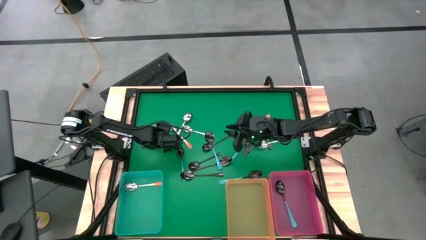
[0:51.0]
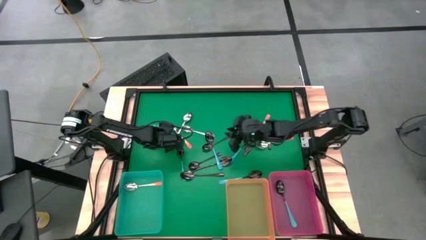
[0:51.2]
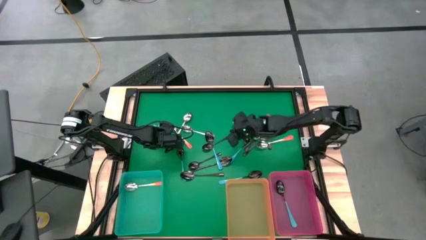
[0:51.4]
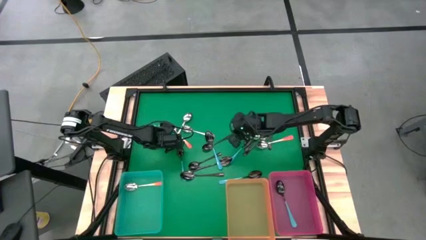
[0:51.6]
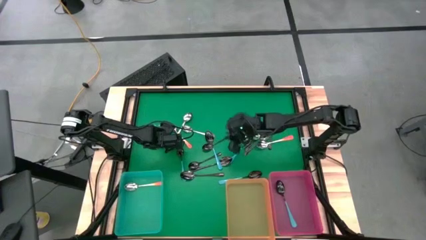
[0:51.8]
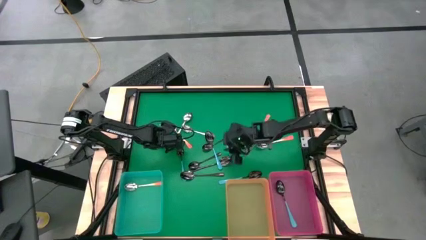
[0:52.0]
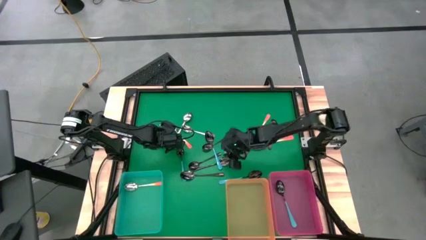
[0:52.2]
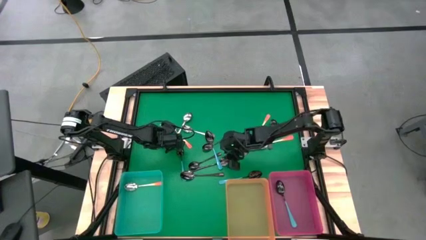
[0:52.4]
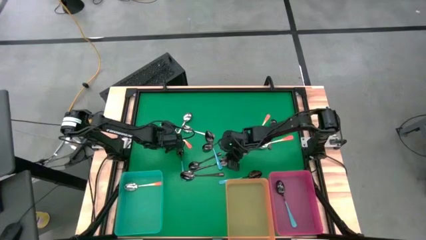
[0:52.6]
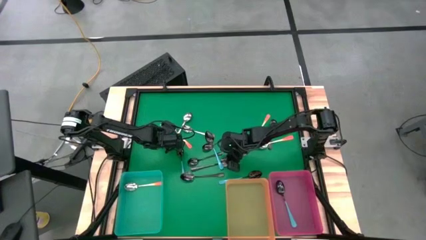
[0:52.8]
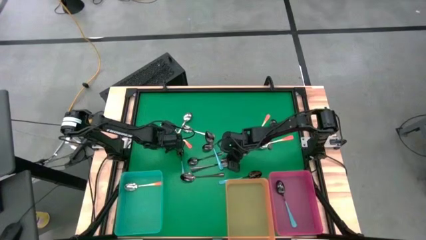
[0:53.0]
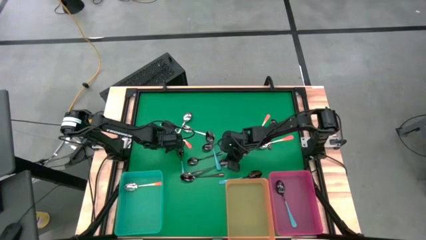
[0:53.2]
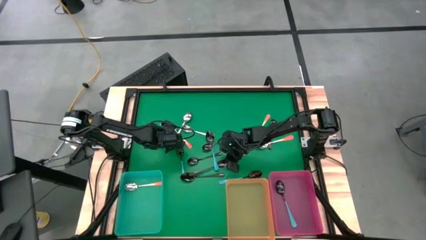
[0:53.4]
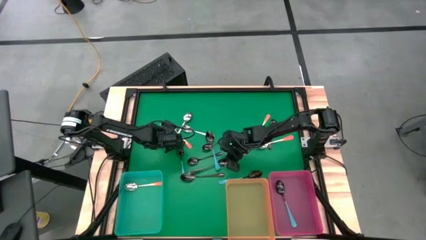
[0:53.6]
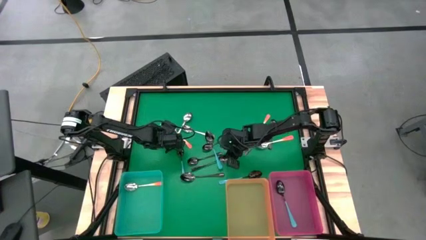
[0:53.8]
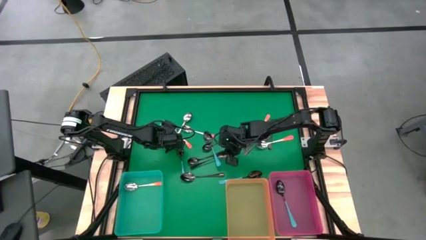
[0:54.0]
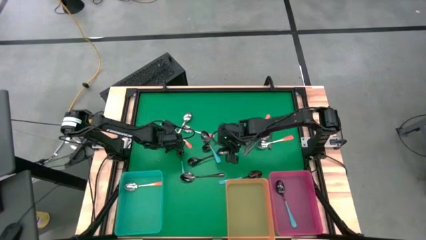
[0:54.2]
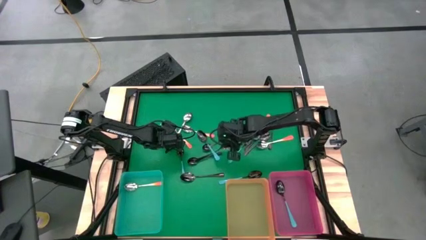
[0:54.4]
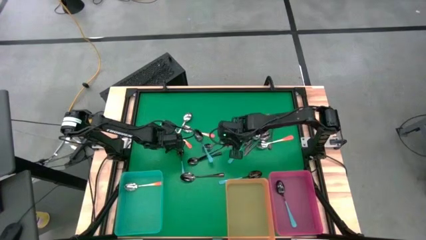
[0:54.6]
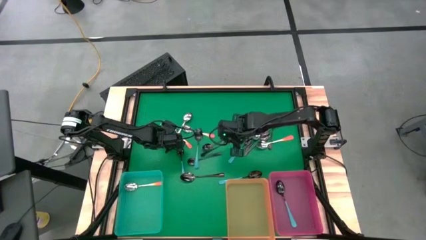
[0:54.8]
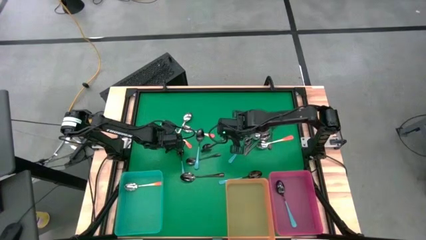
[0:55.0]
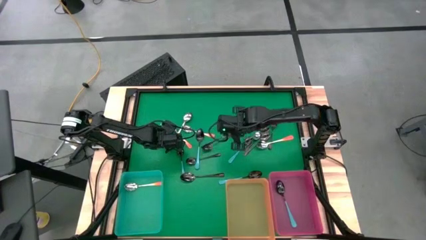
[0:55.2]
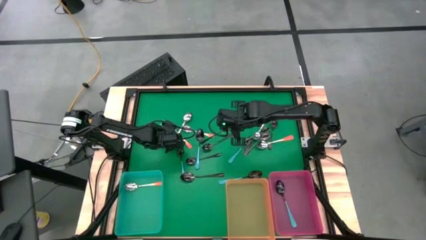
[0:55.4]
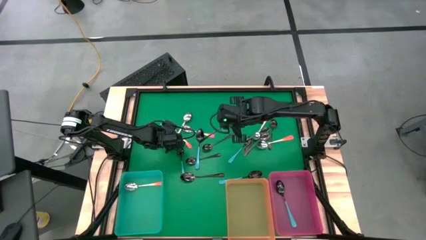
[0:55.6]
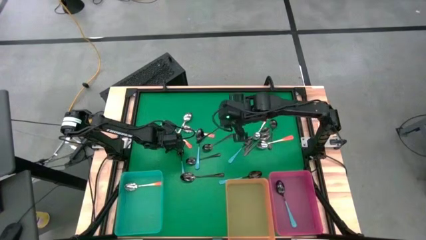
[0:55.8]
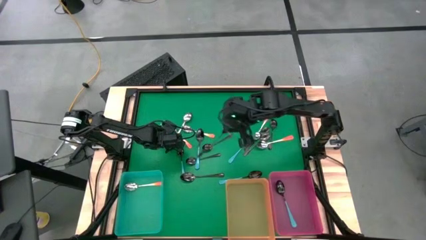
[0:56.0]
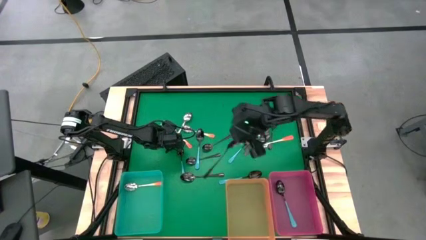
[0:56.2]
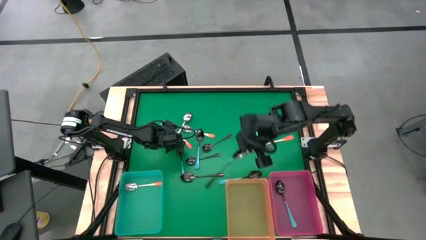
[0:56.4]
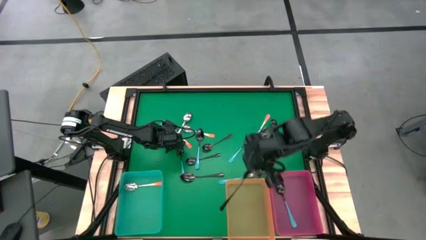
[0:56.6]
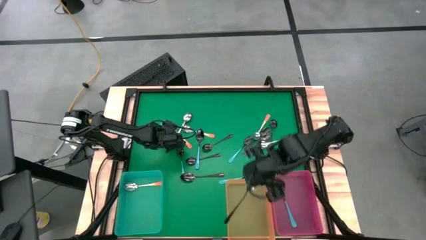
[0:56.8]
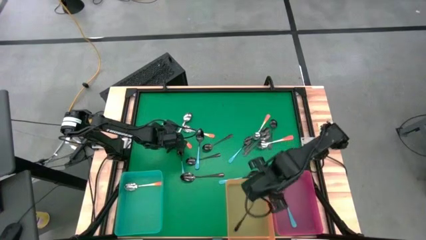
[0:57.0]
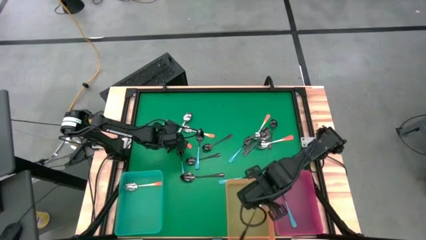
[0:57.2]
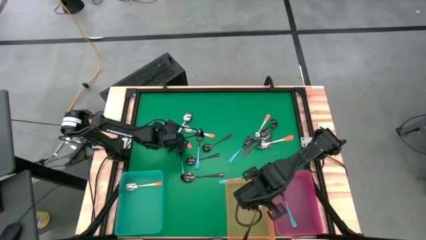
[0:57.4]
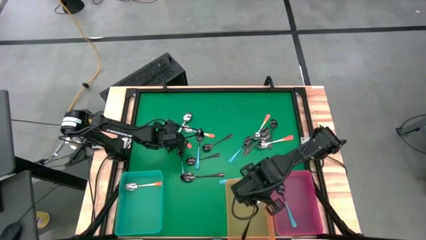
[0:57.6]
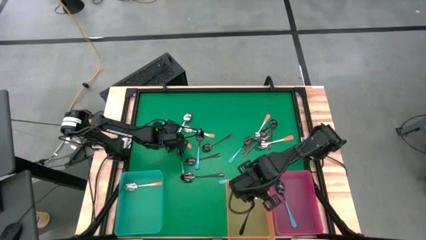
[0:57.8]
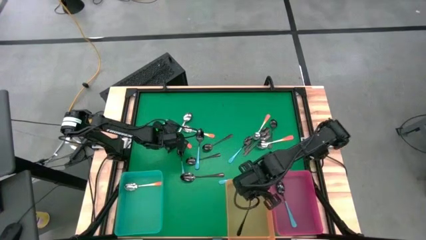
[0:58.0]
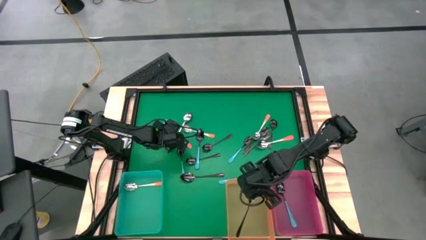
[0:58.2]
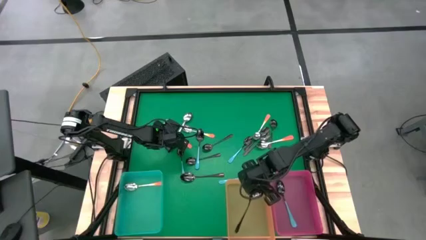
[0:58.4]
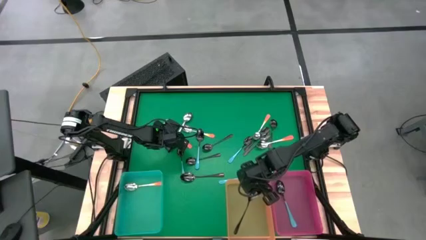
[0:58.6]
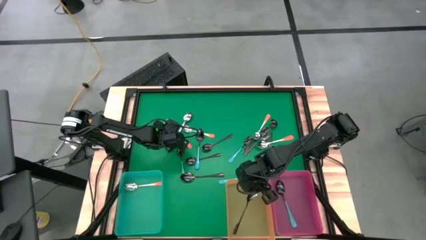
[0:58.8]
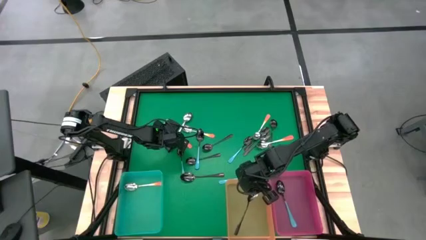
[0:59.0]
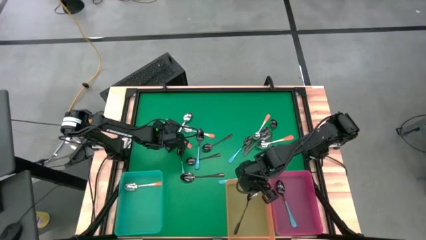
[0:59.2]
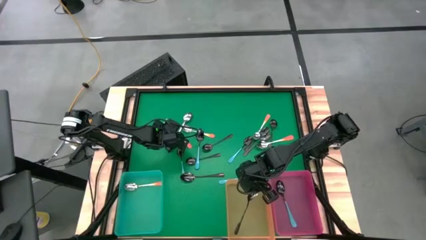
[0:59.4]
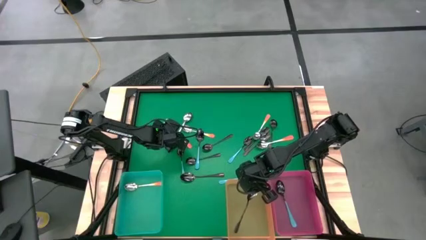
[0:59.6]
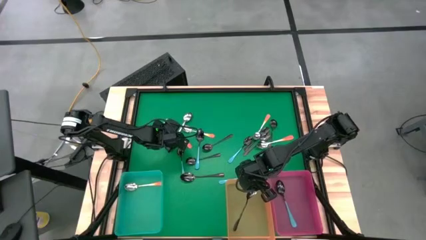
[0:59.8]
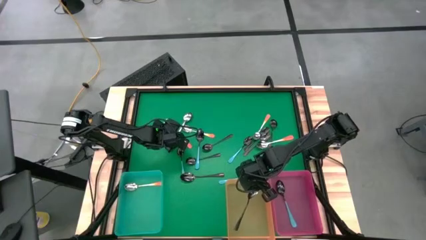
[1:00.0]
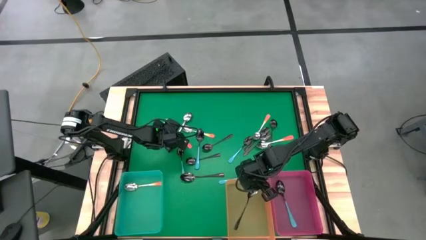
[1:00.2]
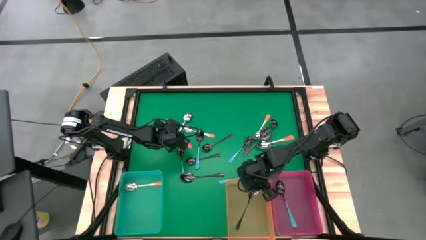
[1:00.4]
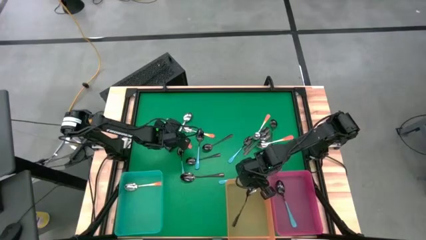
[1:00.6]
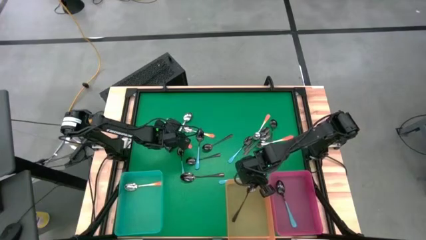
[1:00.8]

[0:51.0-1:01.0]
Task: Sort silverware by color (type)
Put the black spoon into the orange bin
